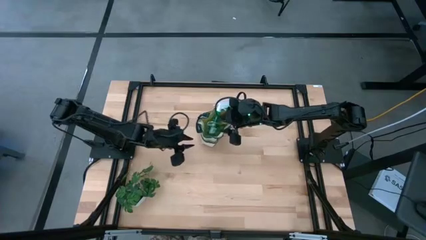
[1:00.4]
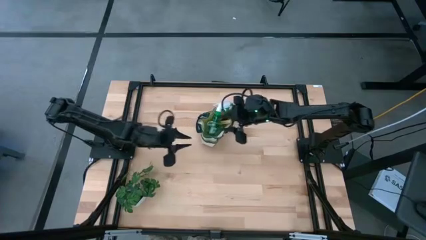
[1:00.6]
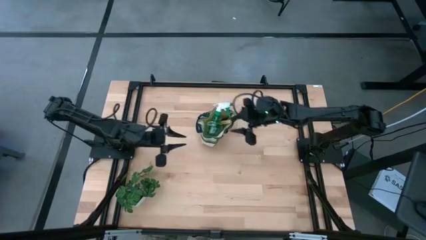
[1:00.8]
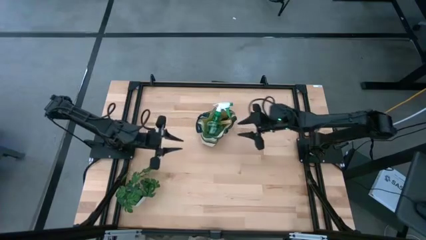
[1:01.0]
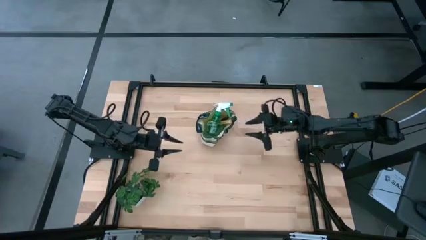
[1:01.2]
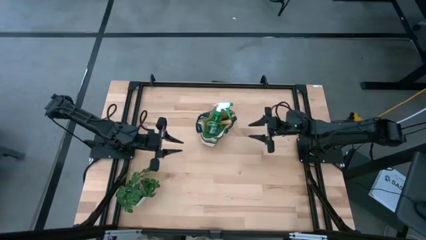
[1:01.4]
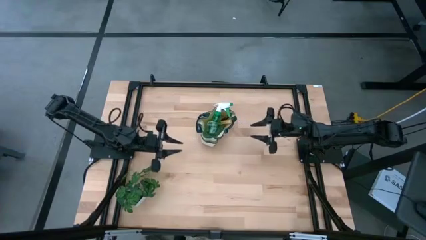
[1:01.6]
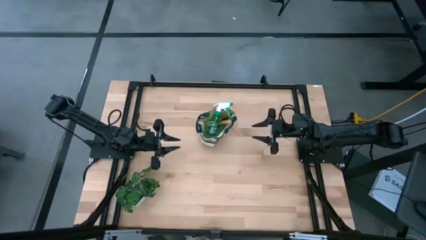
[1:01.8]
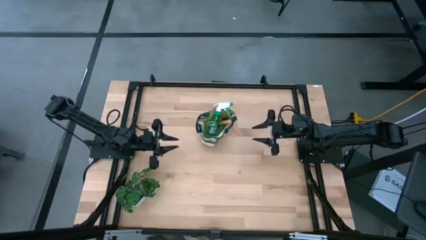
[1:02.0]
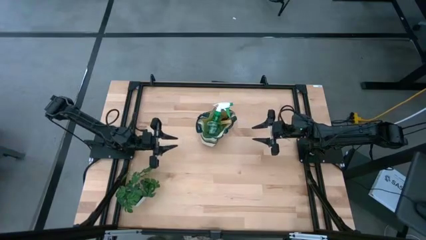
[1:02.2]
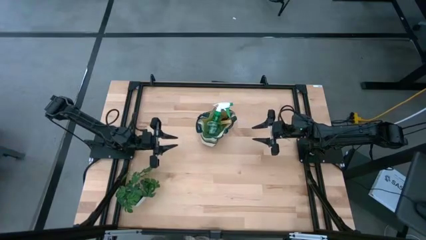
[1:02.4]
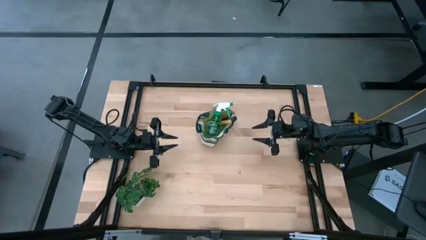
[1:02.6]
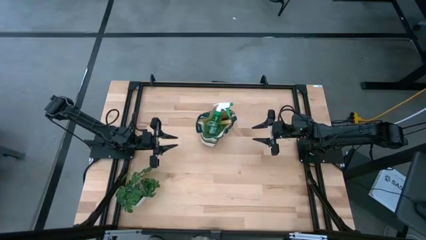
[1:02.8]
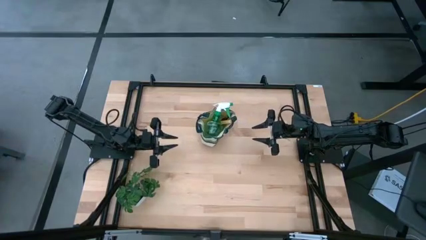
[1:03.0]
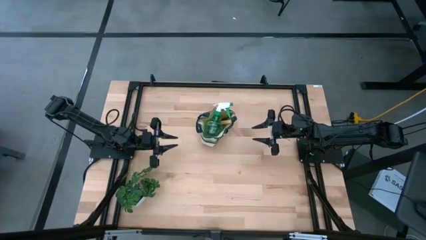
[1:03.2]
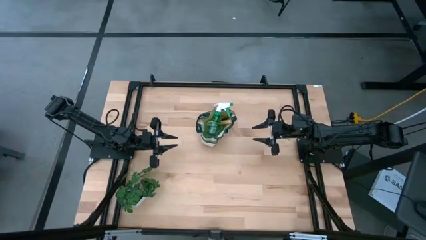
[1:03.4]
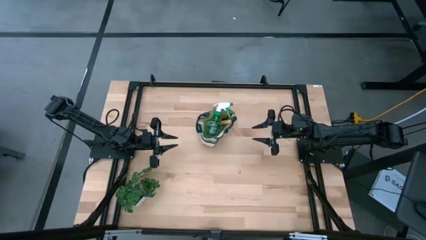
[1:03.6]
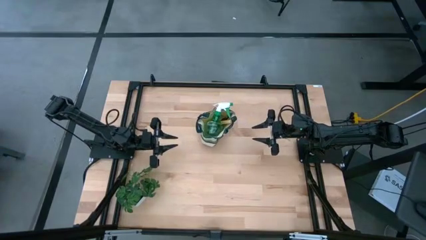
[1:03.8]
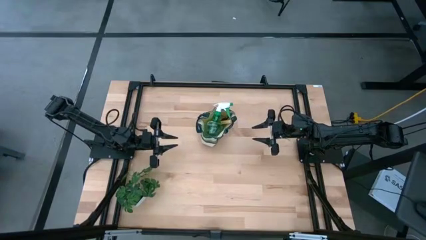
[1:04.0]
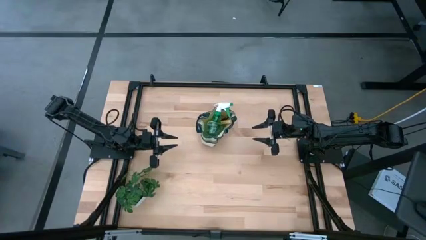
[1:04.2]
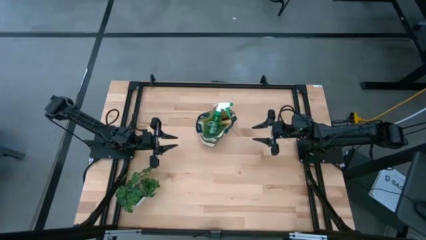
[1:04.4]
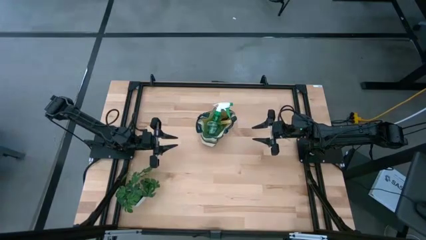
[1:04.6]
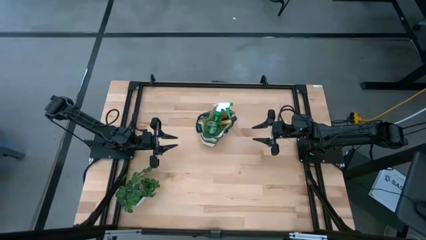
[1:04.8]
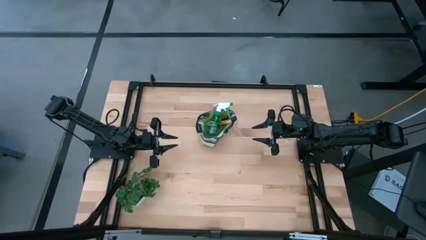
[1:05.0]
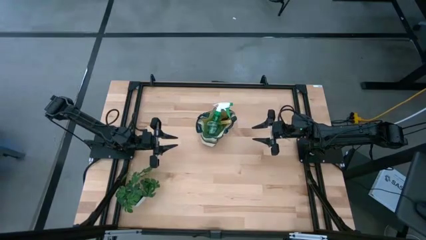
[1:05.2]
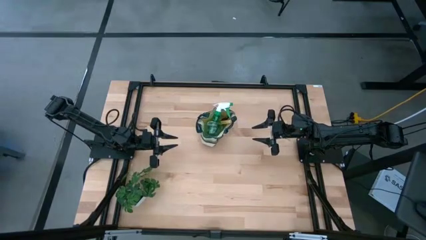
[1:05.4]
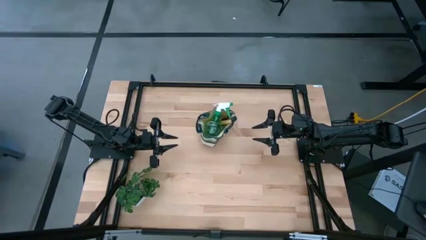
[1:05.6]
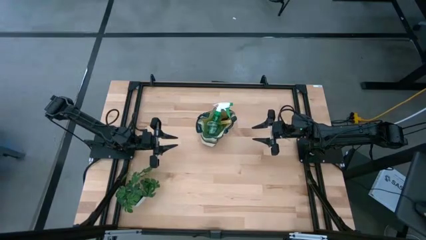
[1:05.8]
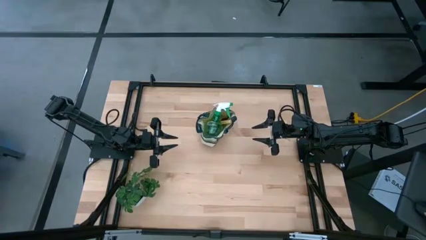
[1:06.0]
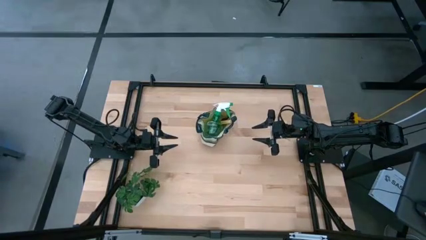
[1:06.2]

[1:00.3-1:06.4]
Task: Pick & Place Garden tools in Gardening bag
Return to Home Position

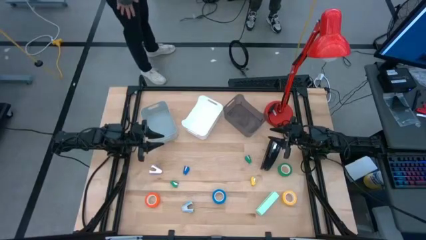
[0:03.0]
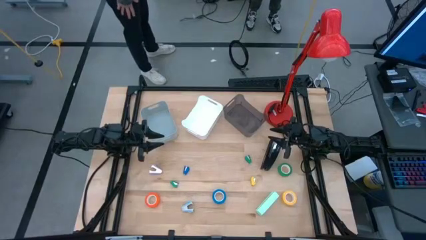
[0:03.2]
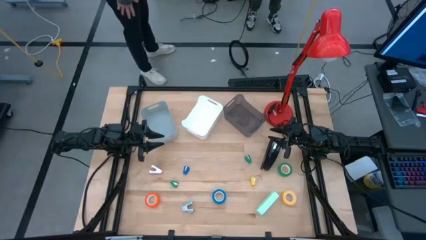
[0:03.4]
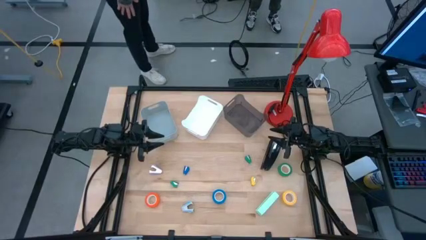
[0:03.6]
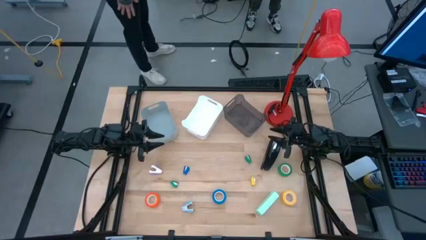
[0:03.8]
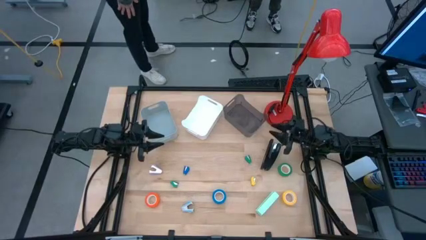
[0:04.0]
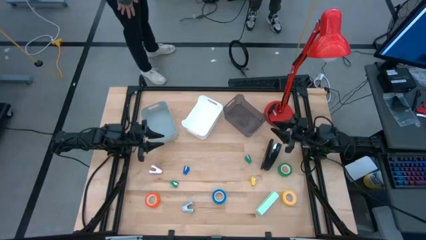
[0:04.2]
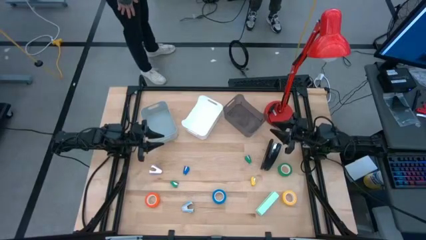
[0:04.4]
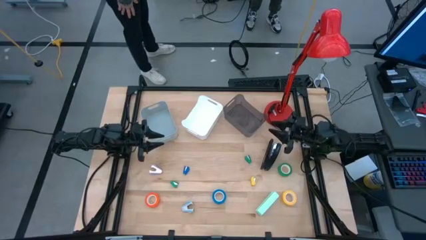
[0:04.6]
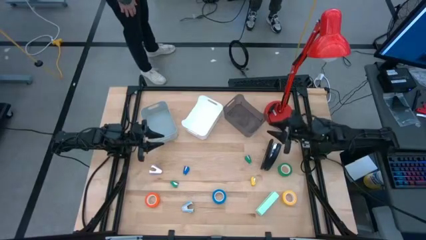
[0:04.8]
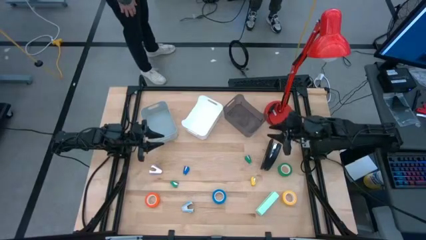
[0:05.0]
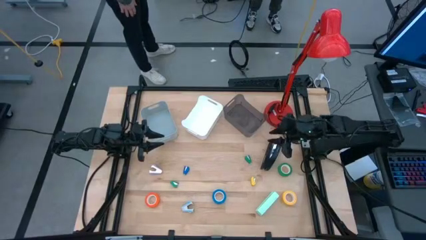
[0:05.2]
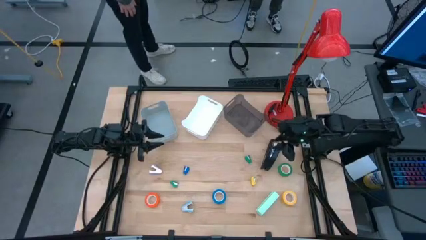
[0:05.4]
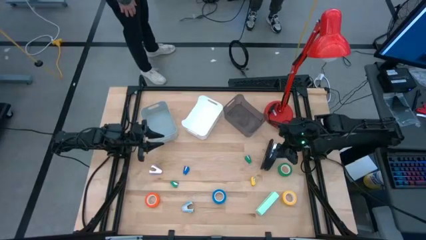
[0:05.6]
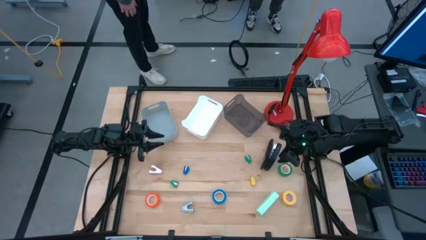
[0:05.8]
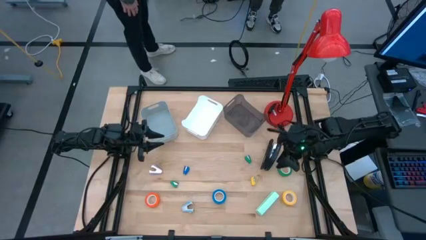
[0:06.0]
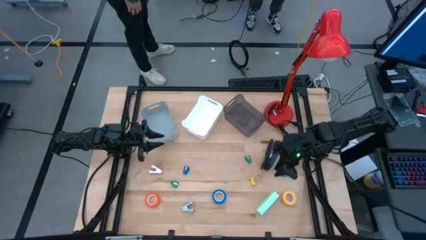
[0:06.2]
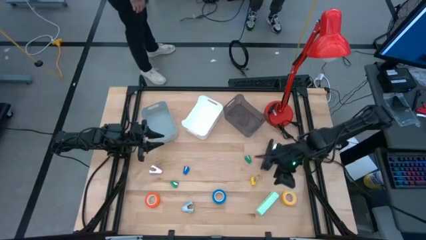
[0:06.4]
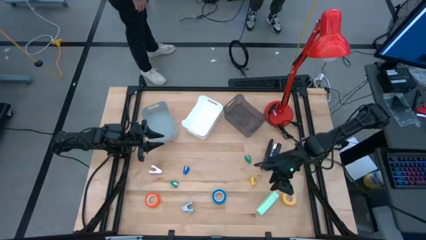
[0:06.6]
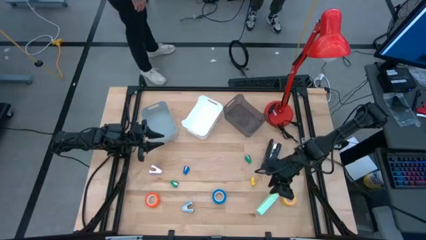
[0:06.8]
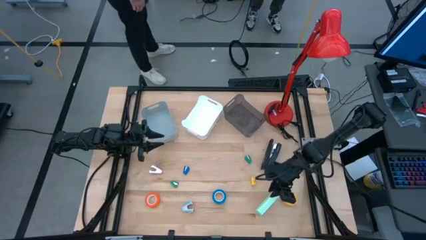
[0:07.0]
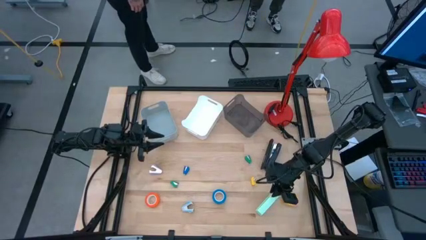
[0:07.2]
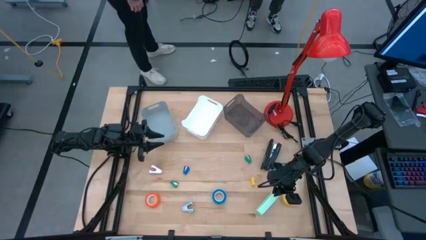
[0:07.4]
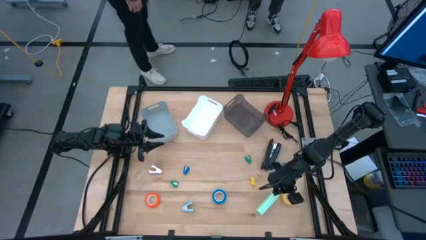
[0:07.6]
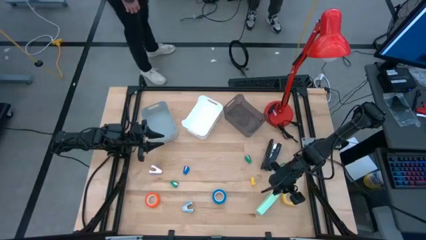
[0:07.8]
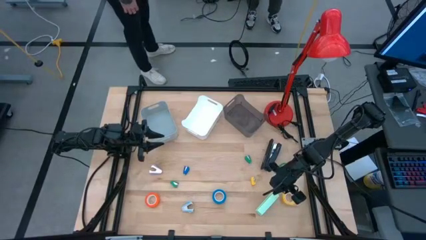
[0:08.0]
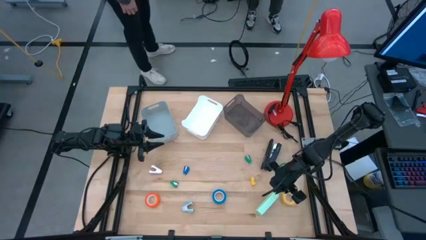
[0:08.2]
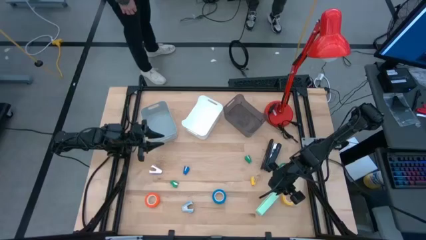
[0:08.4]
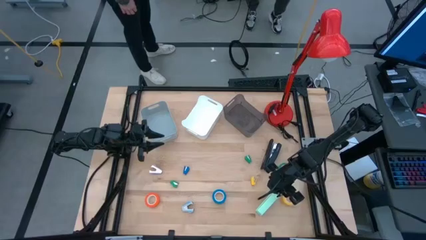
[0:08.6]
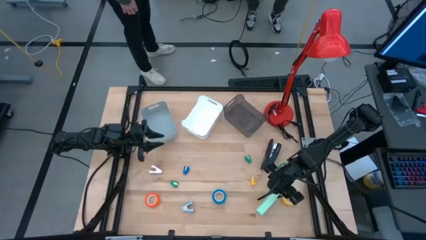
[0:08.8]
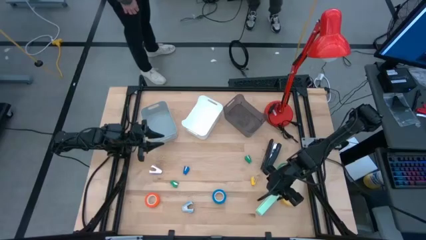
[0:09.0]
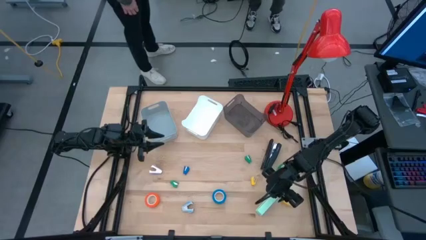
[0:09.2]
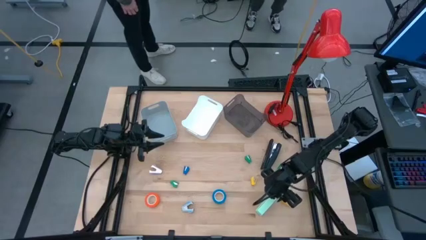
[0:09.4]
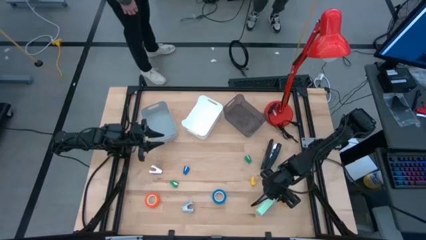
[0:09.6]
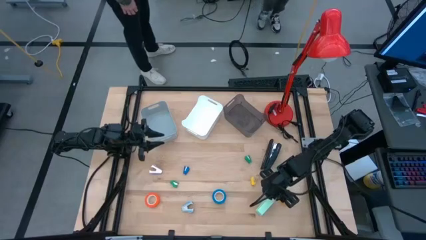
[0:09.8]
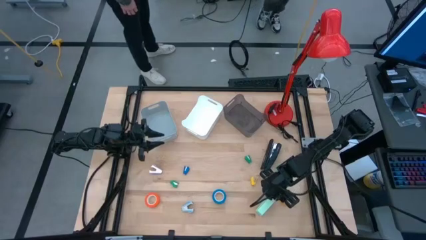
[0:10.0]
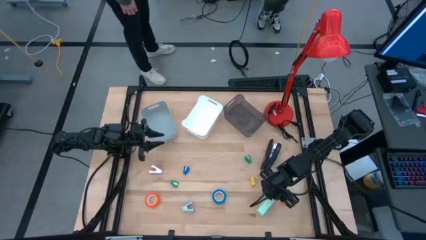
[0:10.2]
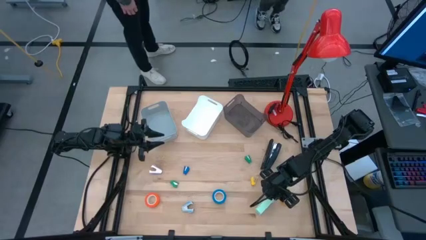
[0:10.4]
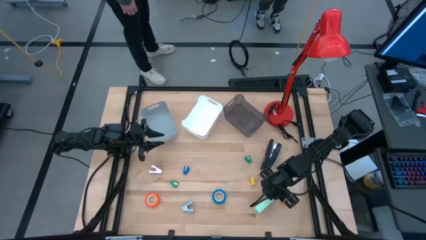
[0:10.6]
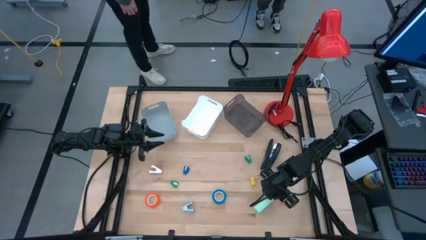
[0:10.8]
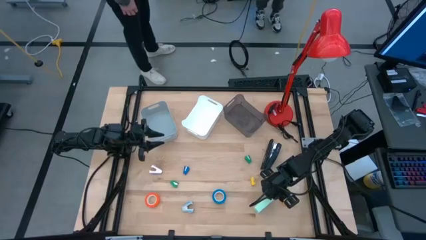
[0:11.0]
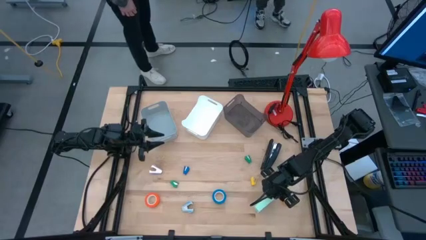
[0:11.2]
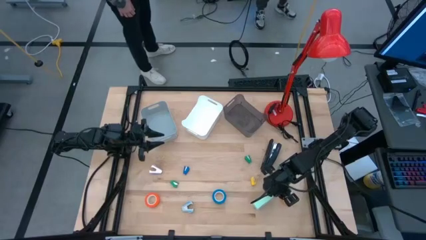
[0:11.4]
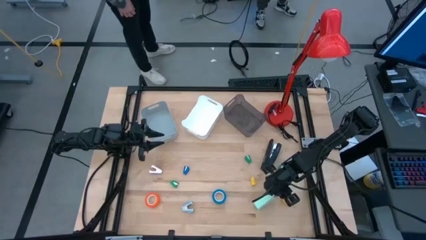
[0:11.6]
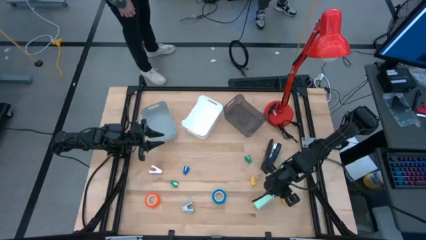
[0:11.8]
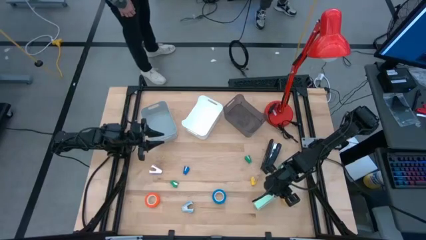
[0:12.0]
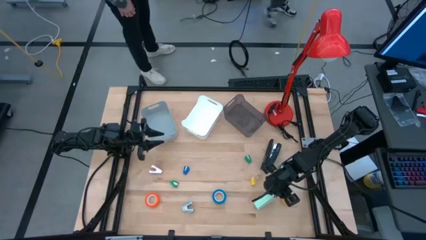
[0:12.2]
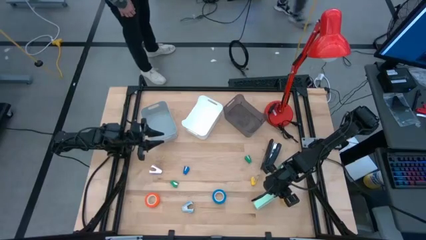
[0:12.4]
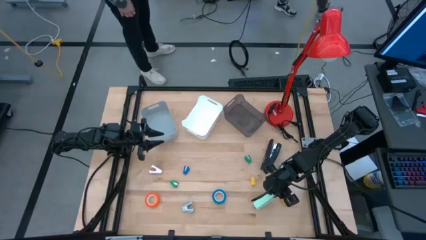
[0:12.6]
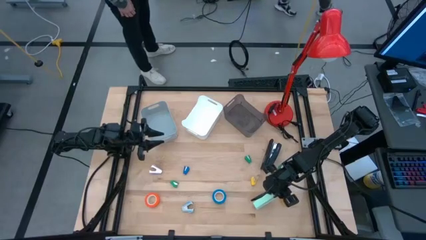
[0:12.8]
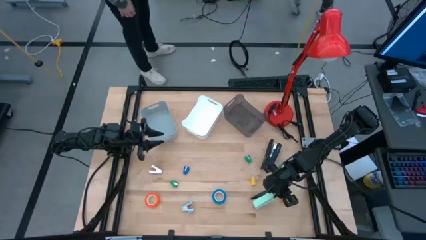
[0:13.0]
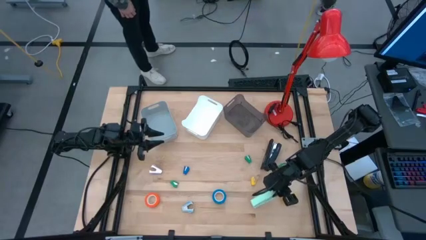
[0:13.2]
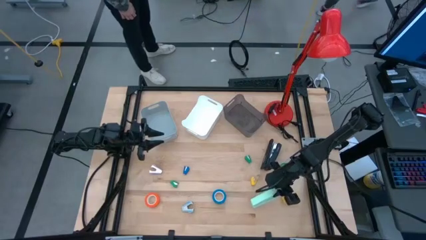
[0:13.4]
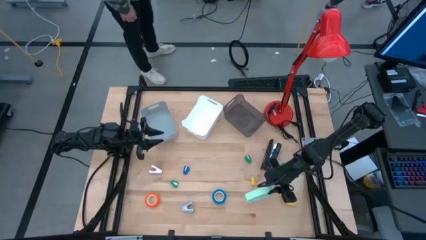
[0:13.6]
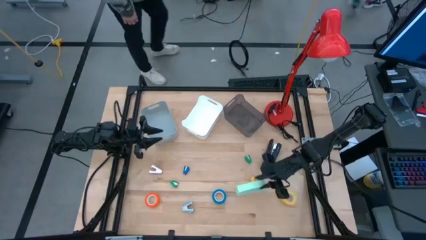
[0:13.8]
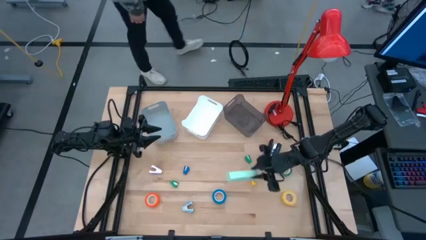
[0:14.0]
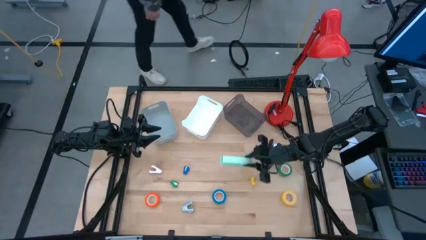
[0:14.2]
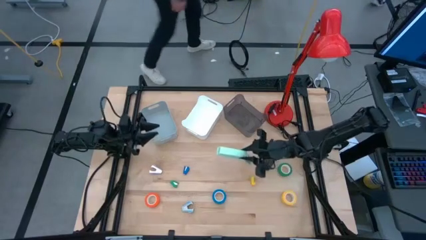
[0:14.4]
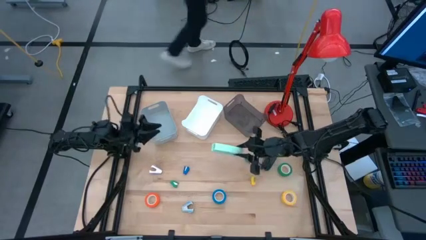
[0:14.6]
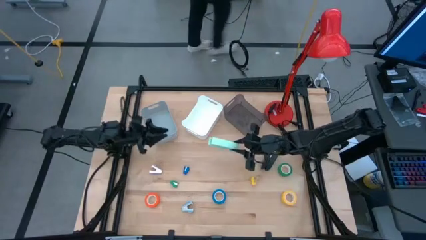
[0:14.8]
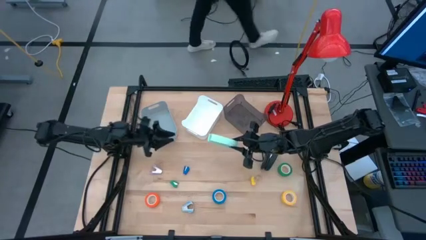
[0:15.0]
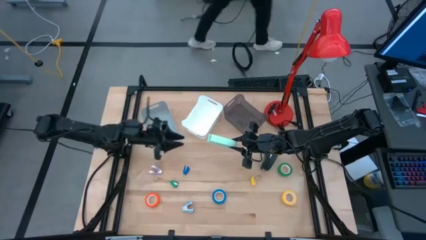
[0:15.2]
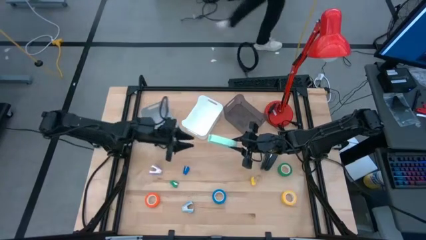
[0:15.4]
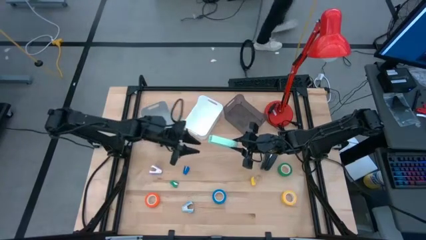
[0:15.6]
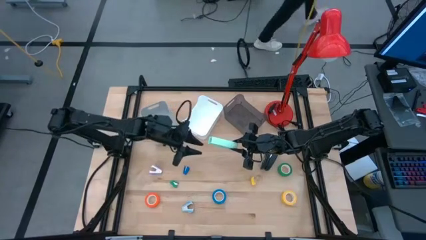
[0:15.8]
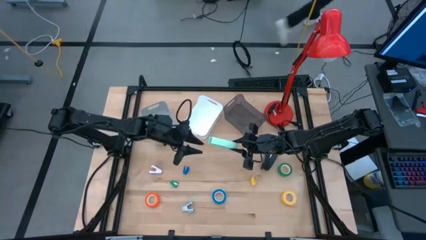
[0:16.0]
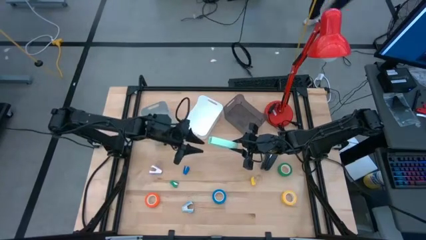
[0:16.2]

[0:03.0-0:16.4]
Task: Pick and place Stapler, Stapler remover, tape
Put the large light green stapler into the gray bin
